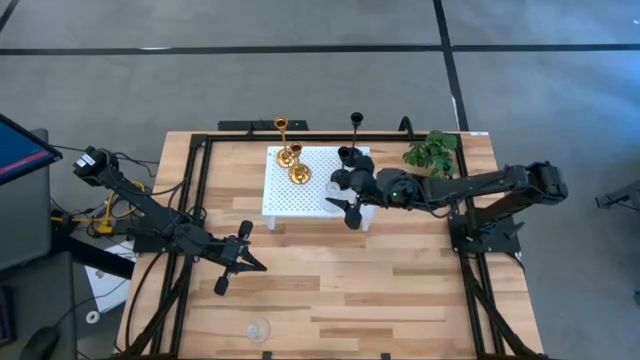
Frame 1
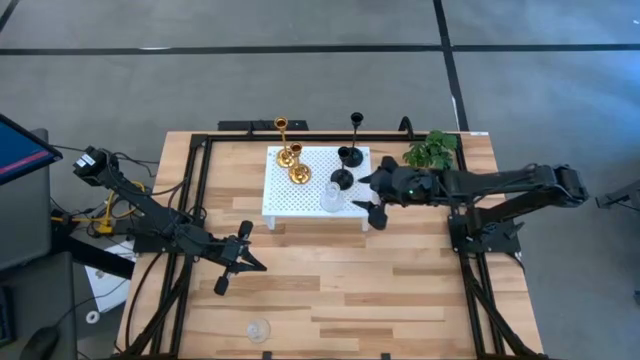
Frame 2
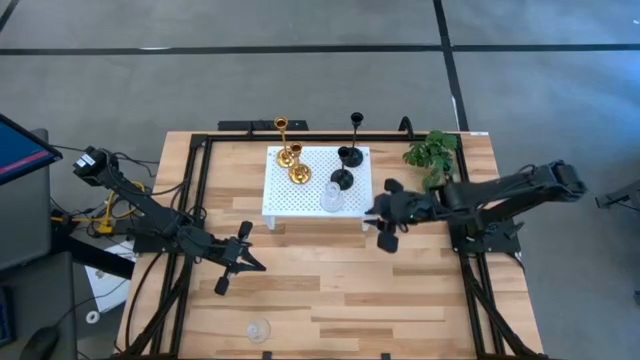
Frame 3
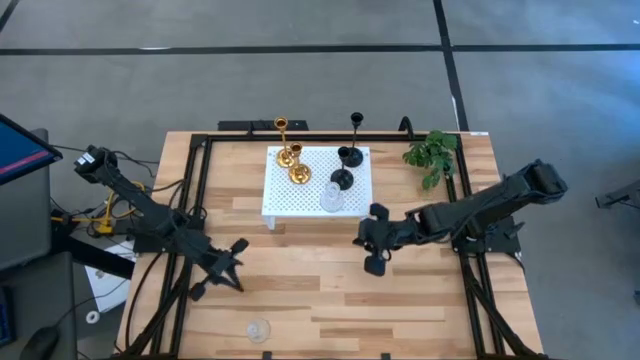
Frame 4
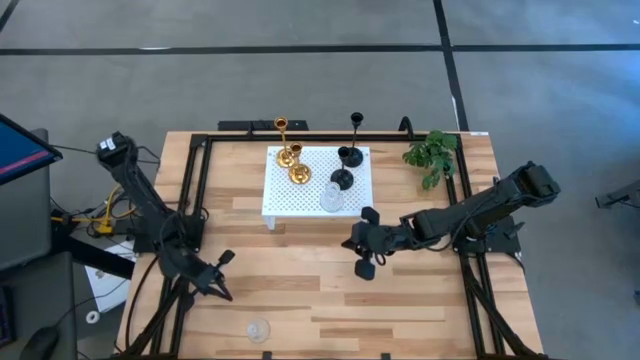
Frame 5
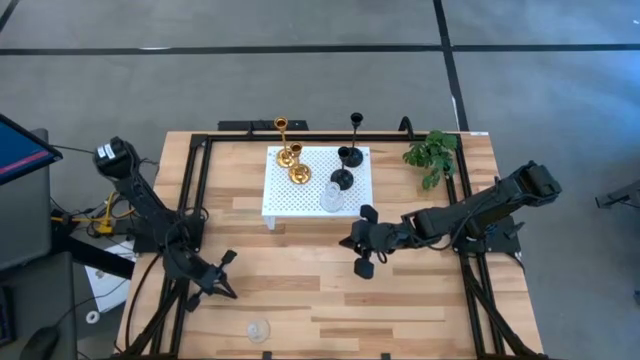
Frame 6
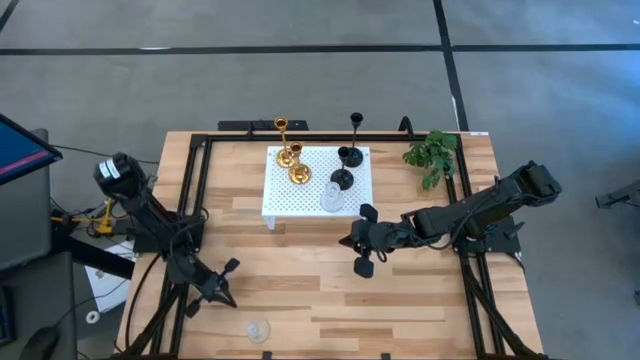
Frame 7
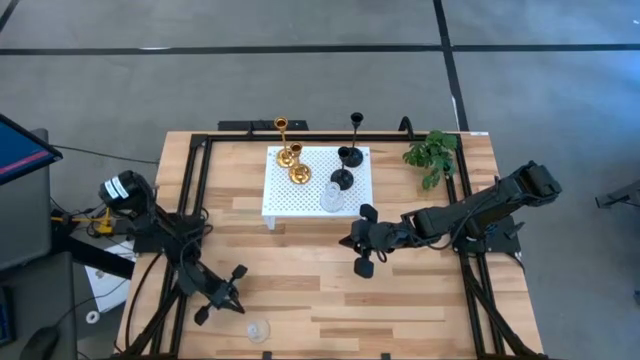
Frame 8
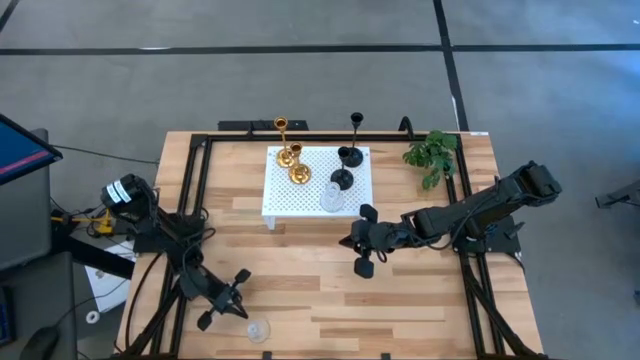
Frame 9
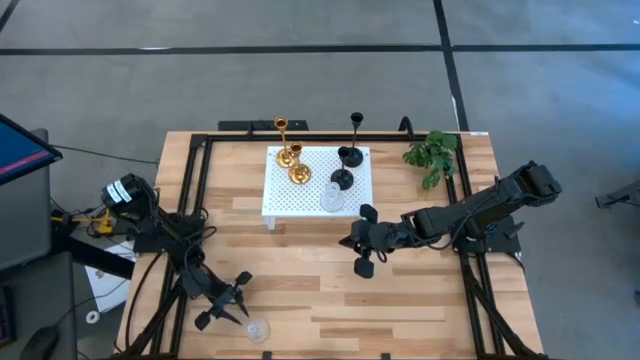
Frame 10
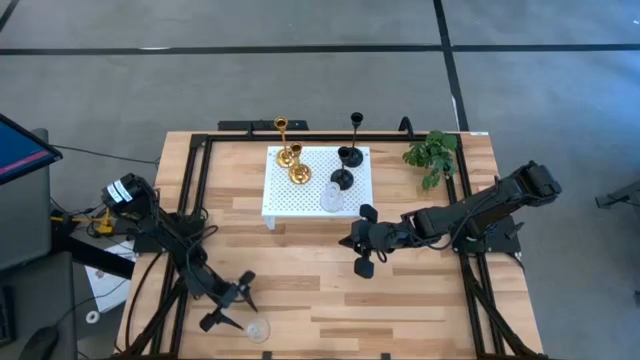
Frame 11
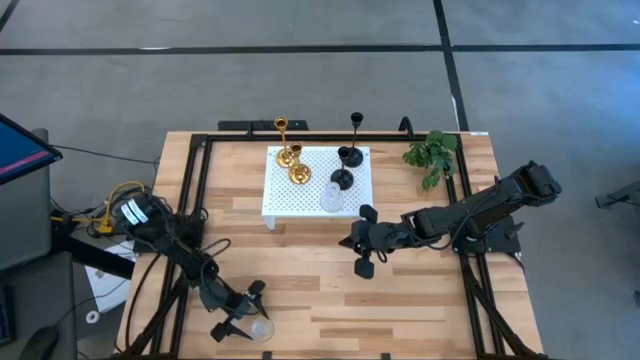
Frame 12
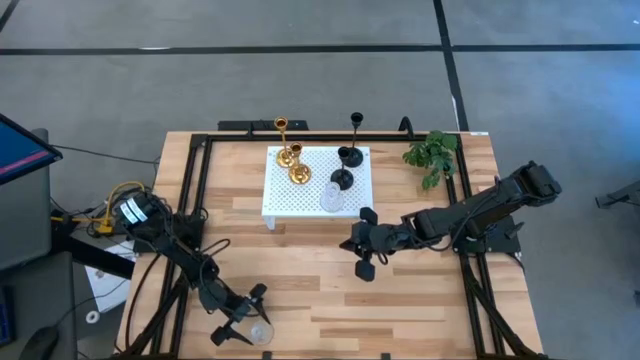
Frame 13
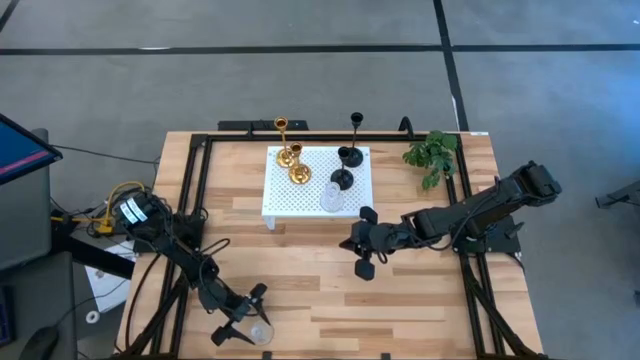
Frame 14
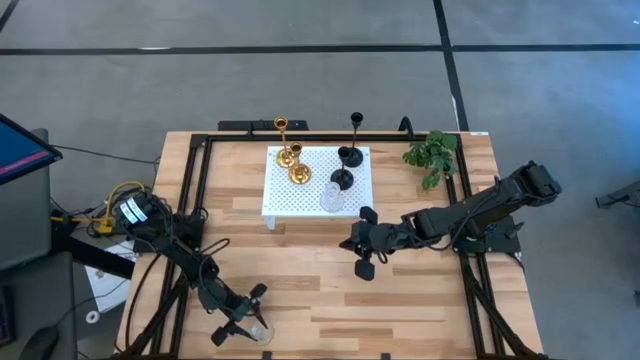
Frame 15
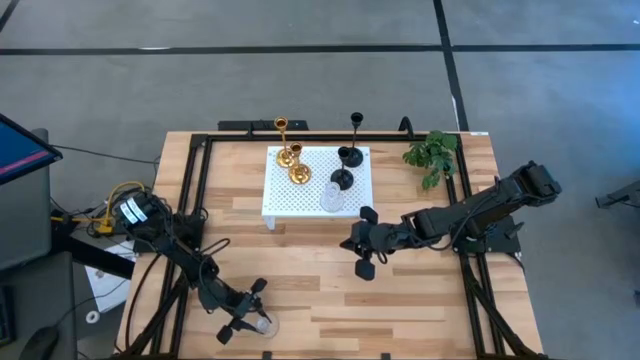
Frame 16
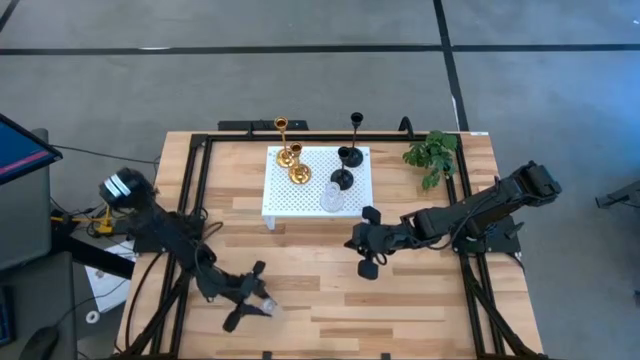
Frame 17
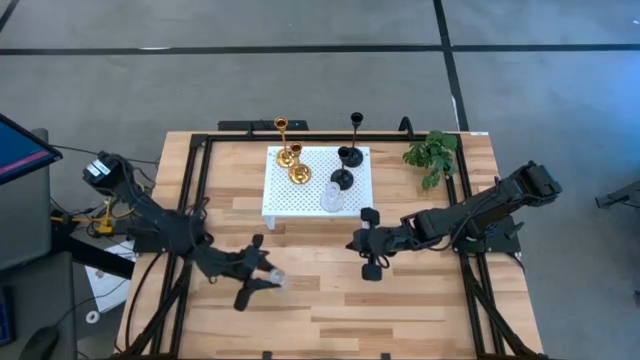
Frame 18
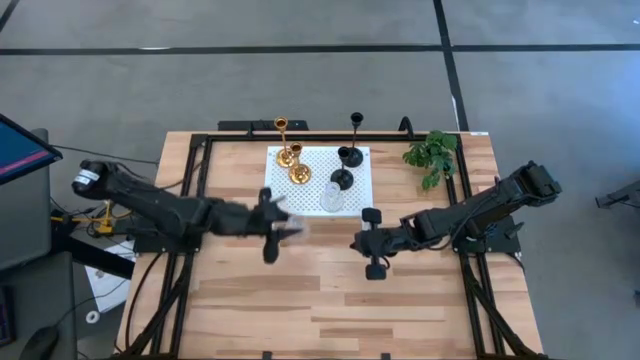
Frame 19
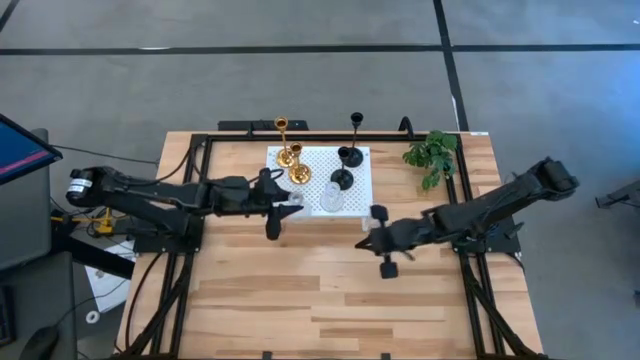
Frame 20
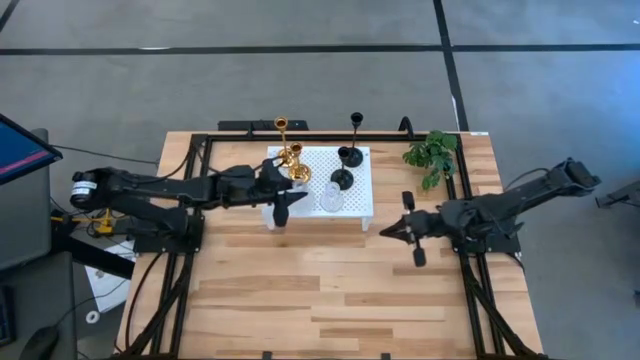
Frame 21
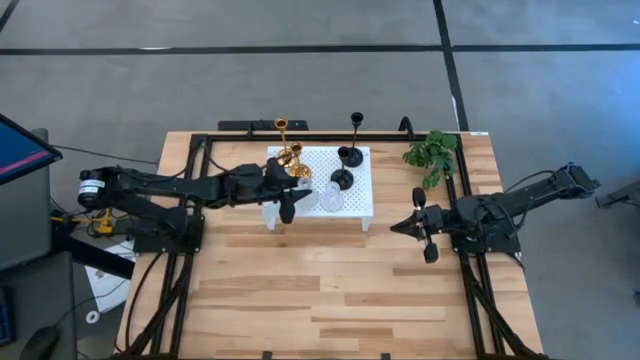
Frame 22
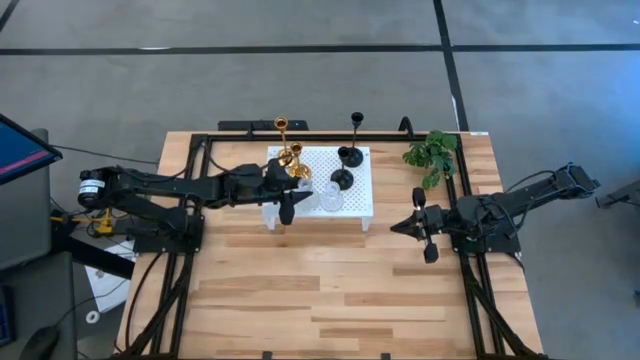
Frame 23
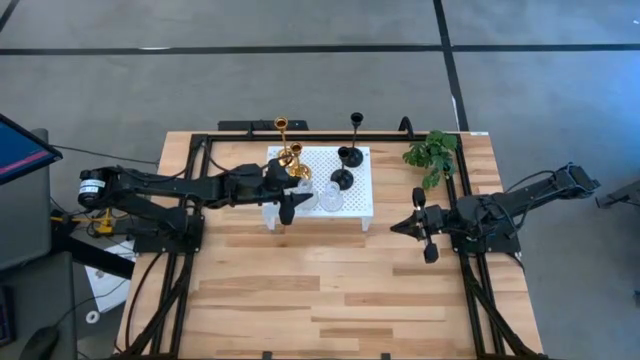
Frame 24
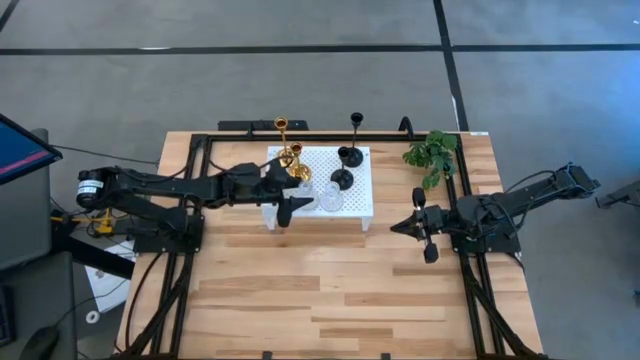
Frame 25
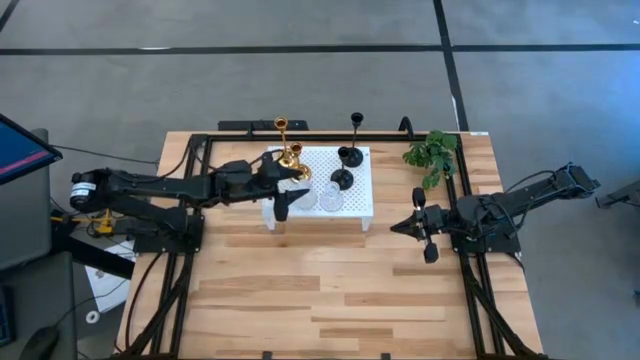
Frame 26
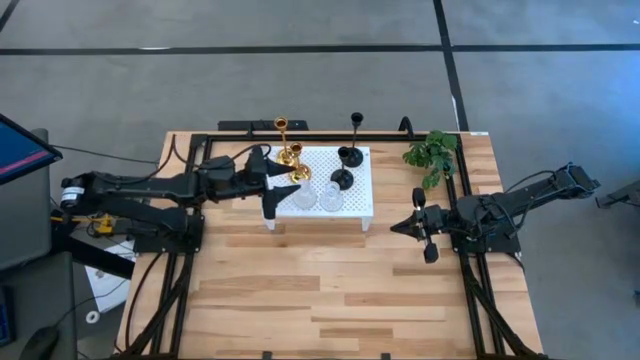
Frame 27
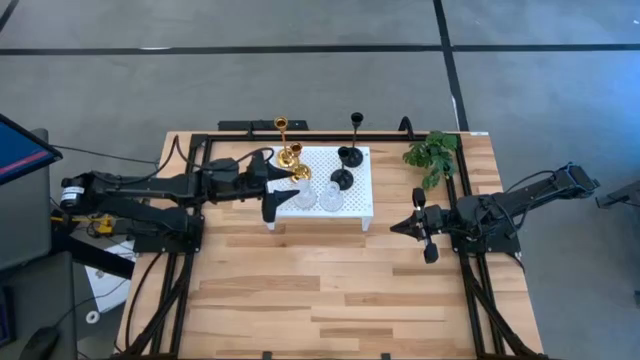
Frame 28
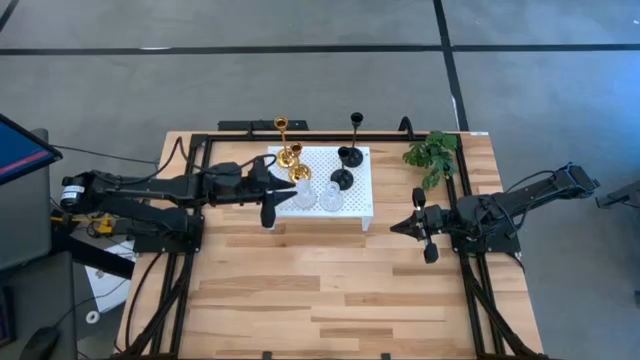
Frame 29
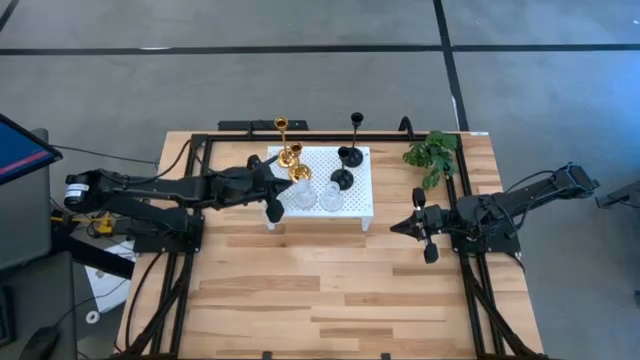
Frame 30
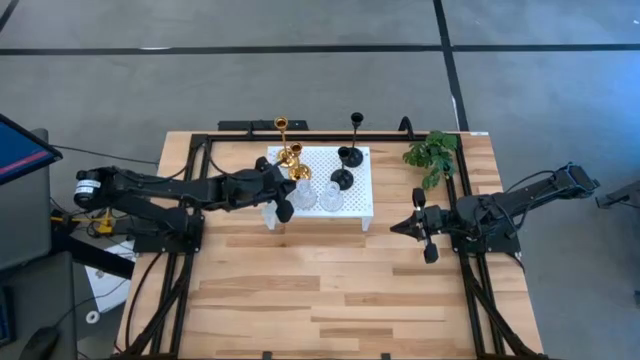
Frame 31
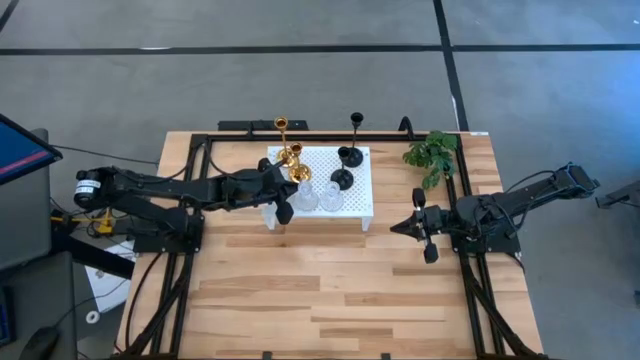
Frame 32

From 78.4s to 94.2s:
Task: Pick & Place candle stick holders
Put the glass candle holder on the shelf

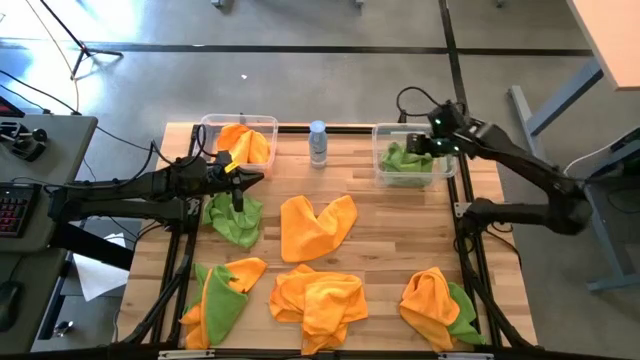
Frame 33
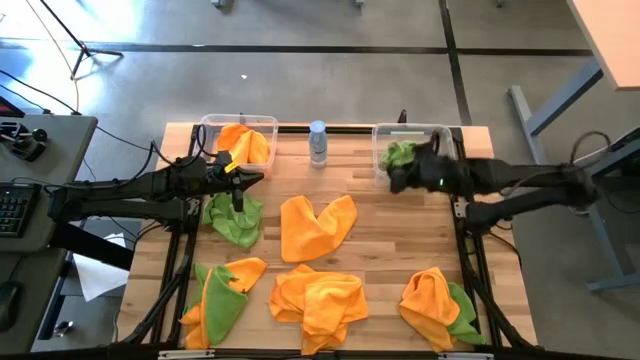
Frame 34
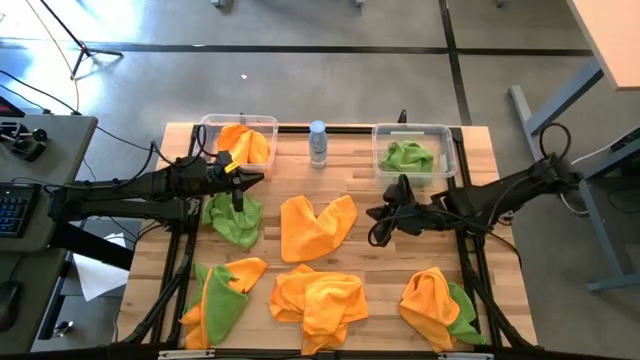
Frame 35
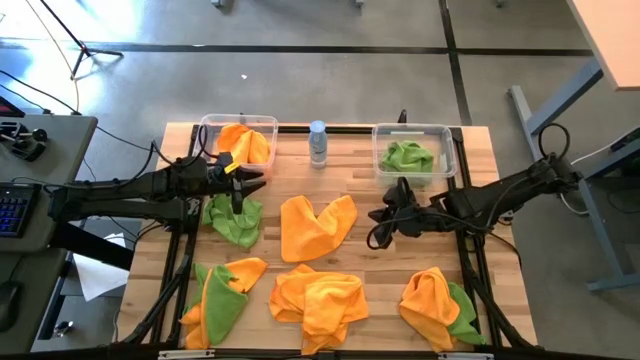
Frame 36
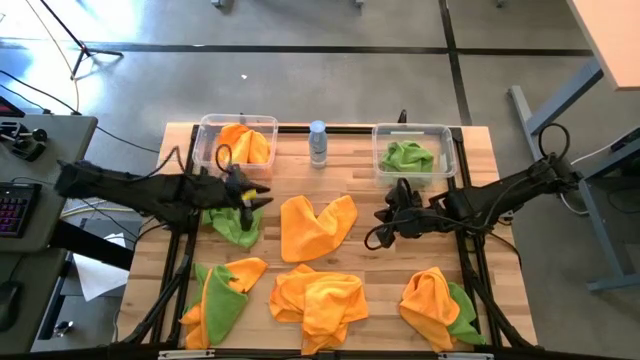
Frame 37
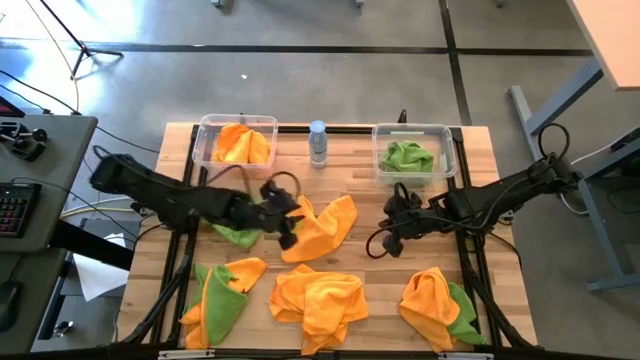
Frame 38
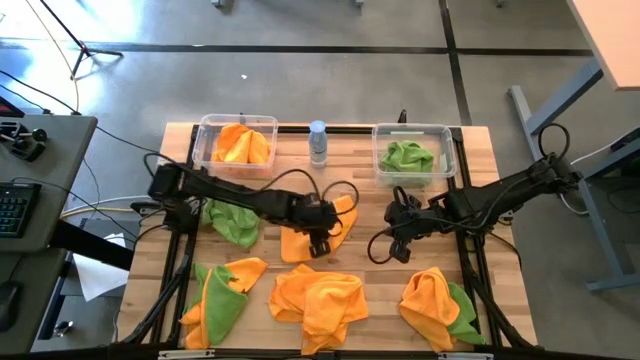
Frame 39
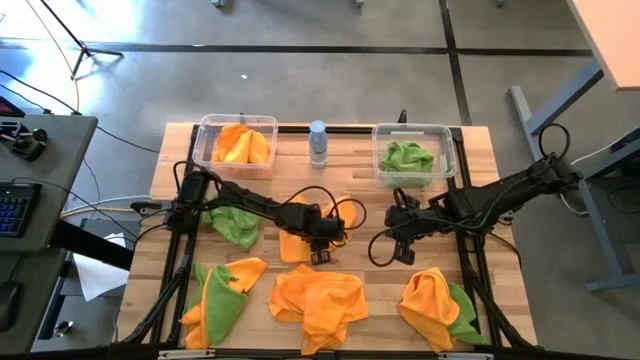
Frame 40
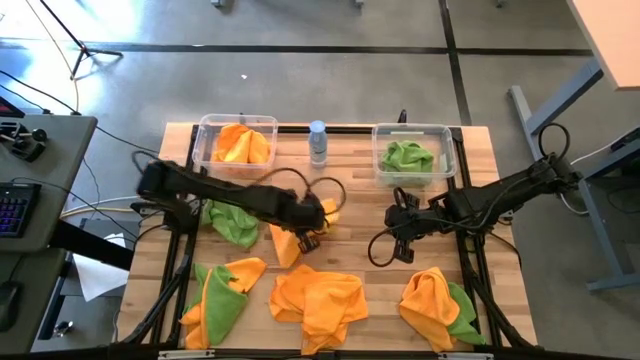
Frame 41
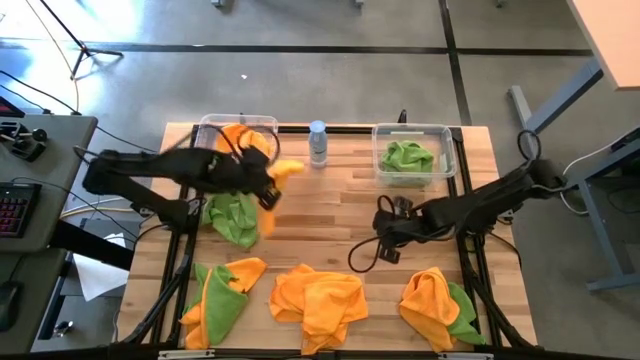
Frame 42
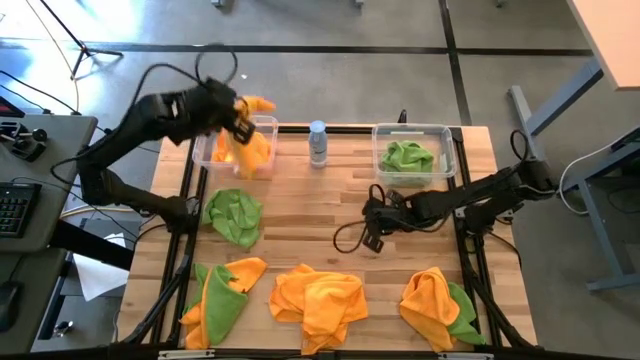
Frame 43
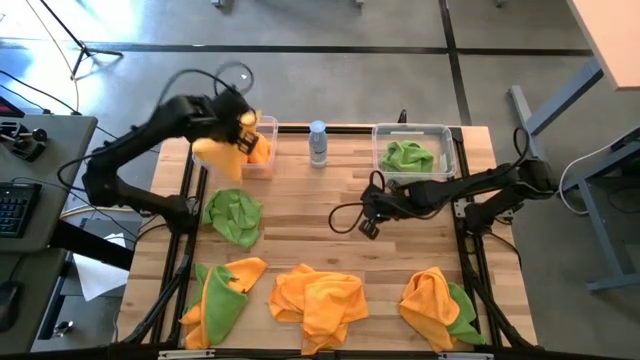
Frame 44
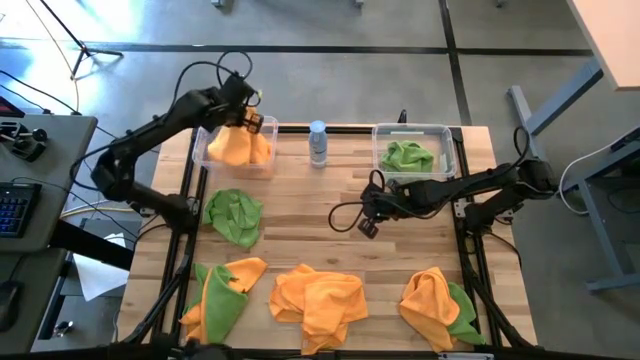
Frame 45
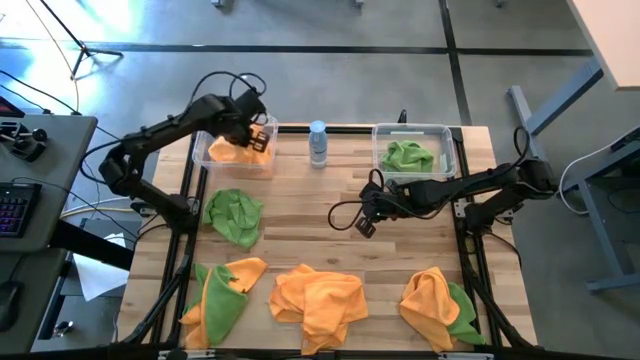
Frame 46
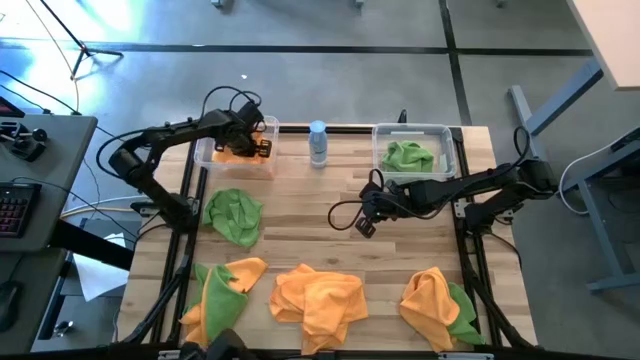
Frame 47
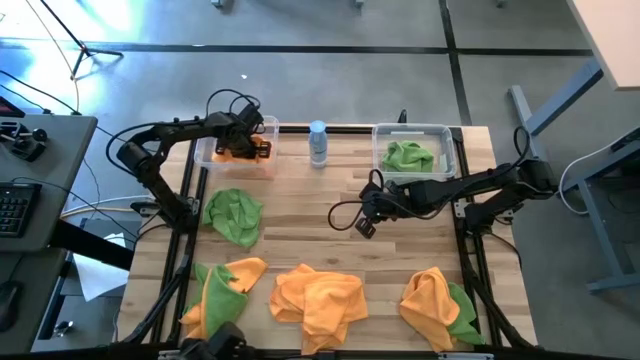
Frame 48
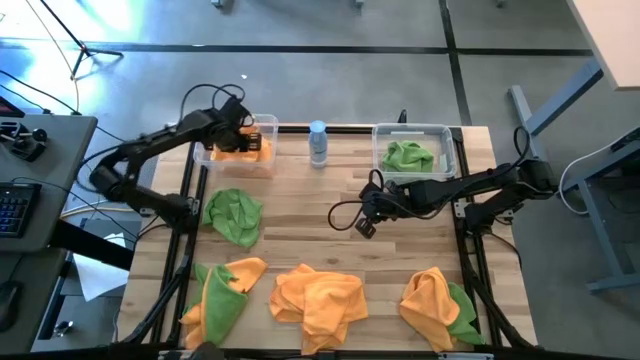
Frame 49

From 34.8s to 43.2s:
Task: Sort microfiber towel by color & place in baskets
Put the orange towel into the left transparent bin
